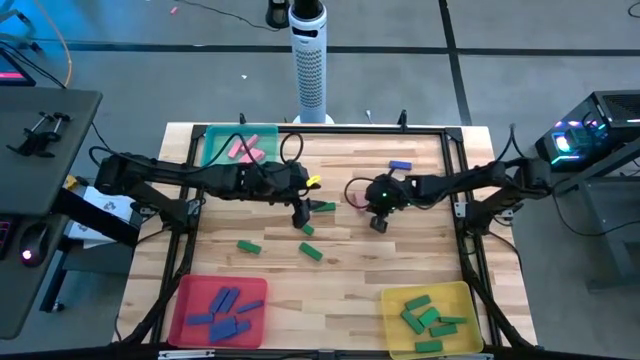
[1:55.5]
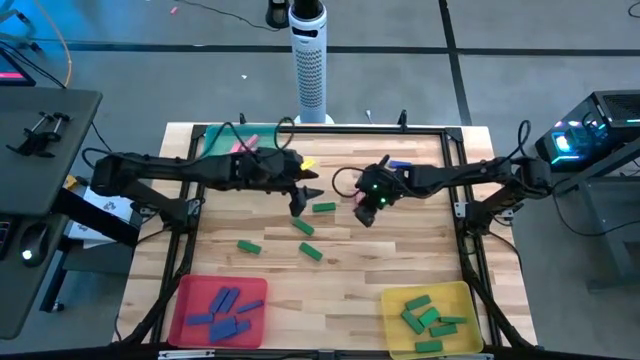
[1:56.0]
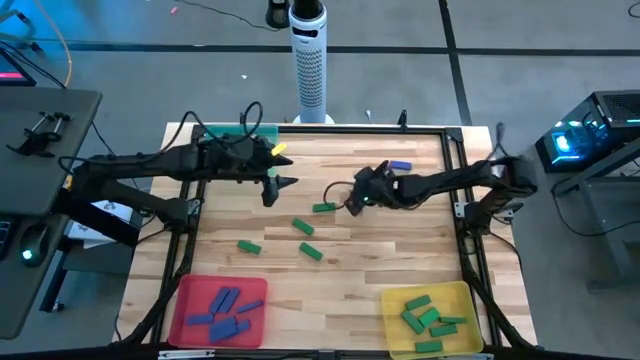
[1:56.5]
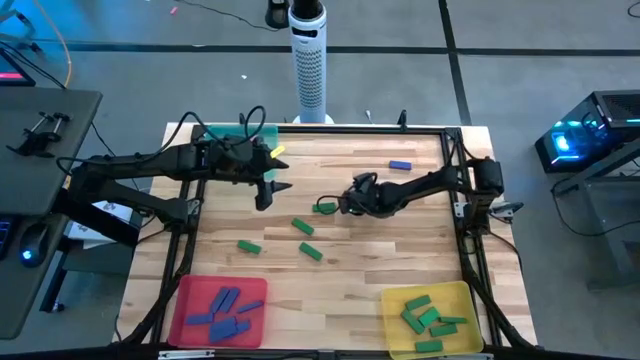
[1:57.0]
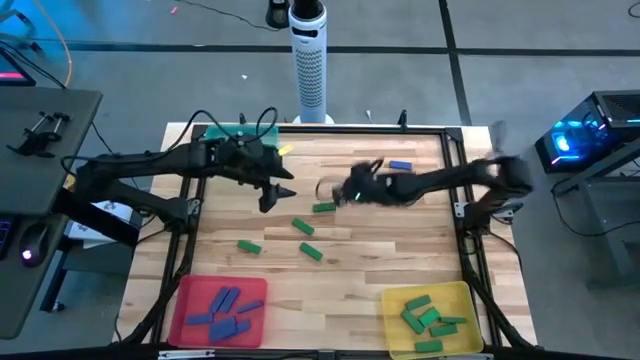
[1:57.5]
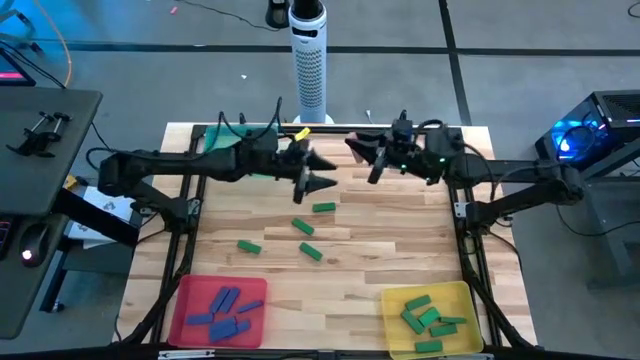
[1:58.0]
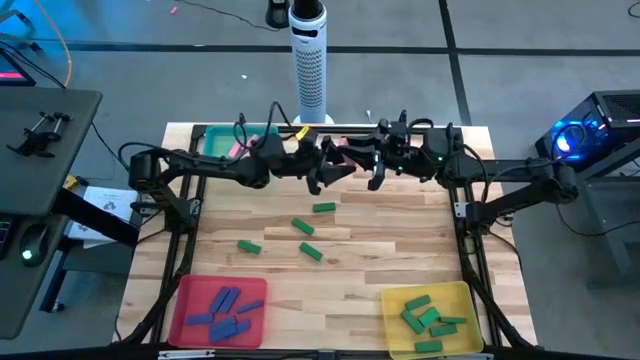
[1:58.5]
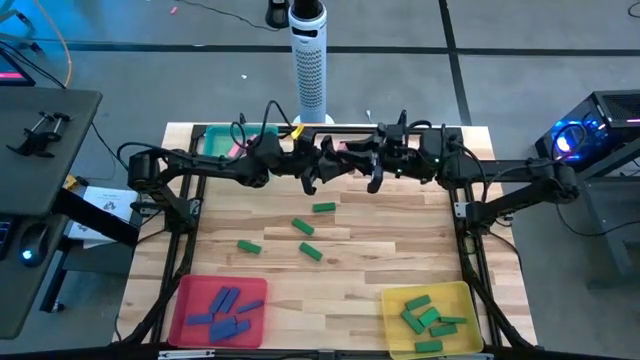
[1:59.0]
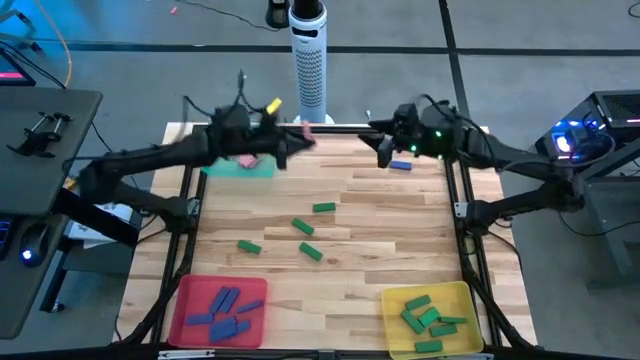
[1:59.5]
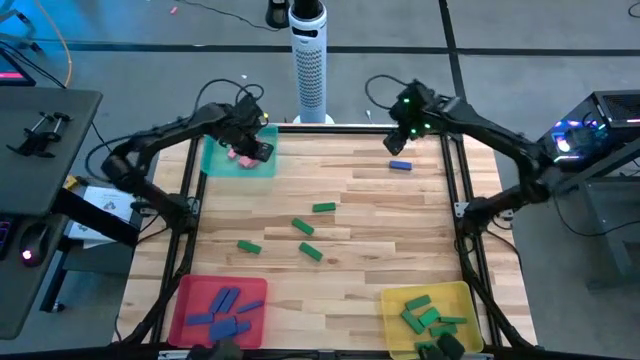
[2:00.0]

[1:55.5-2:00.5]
Task: Sort blocks
Put the pink block into the green bin

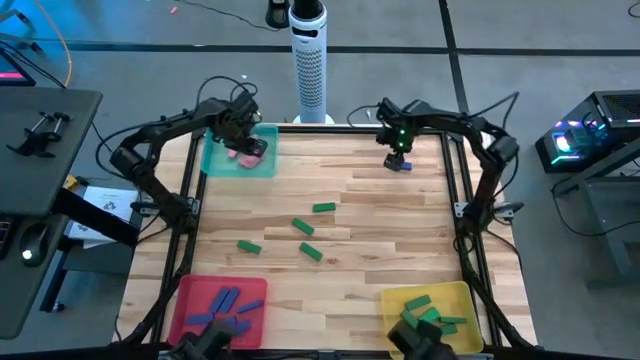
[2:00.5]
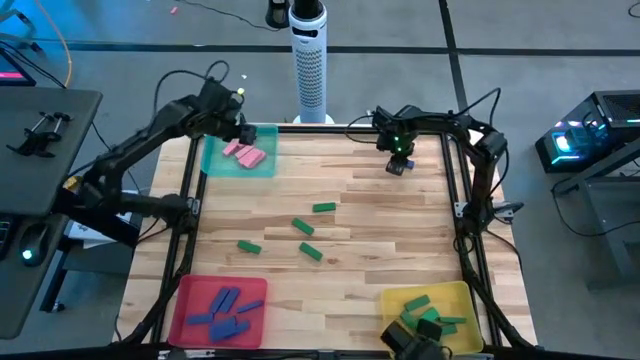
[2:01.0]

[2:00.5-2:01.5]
Put the blue block into the red bin

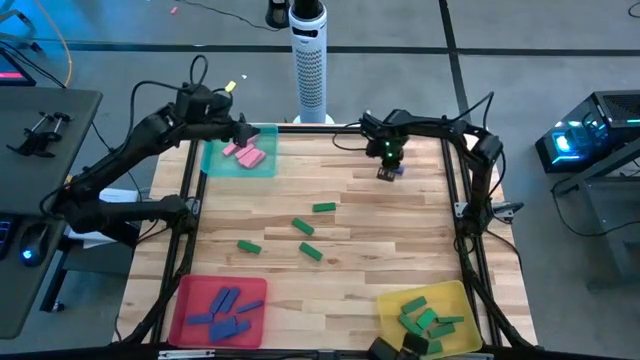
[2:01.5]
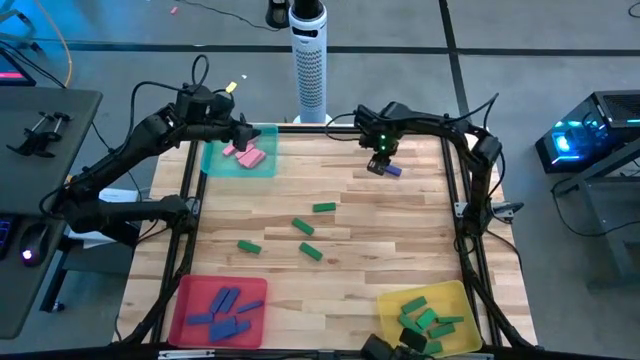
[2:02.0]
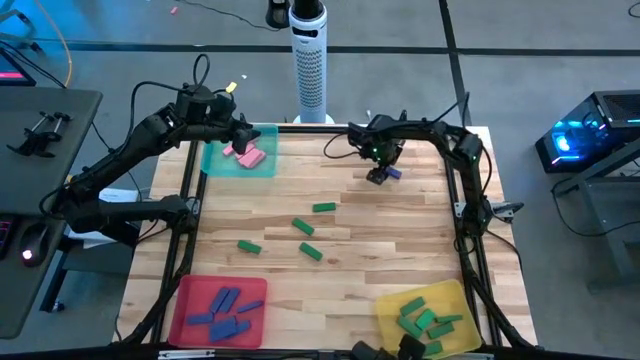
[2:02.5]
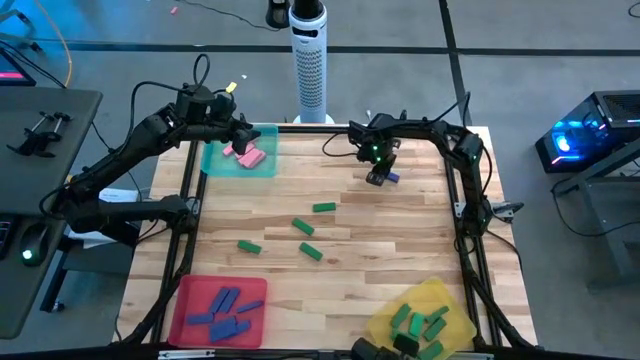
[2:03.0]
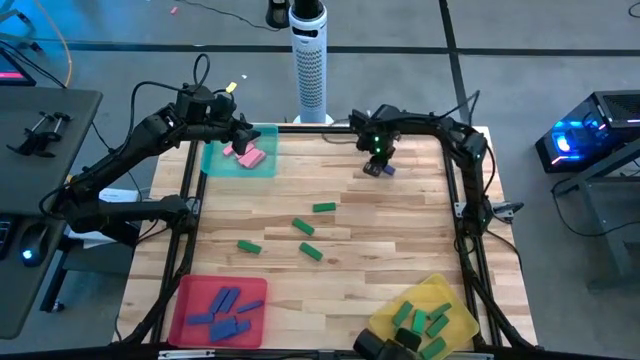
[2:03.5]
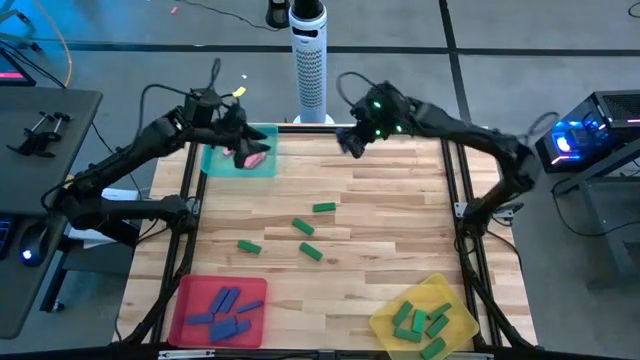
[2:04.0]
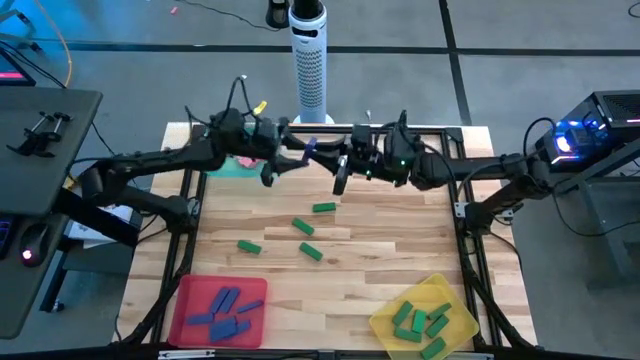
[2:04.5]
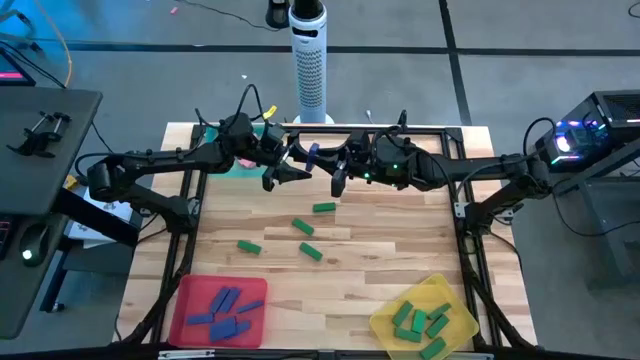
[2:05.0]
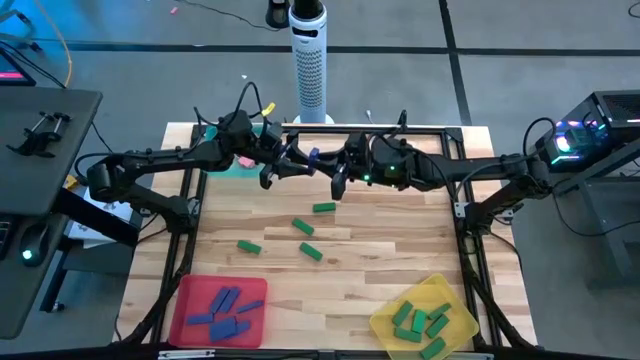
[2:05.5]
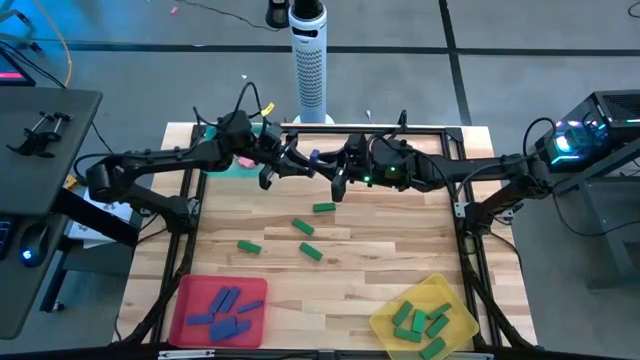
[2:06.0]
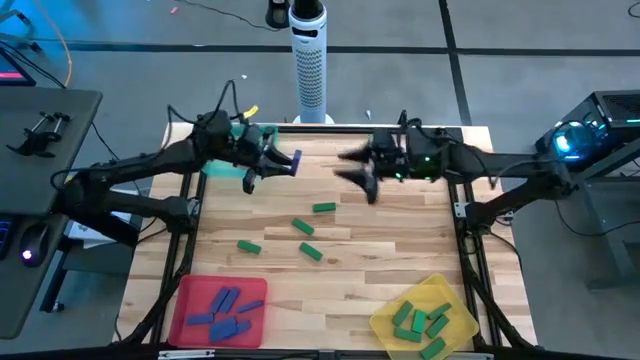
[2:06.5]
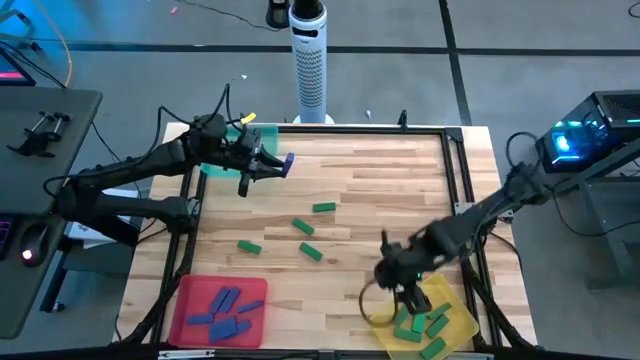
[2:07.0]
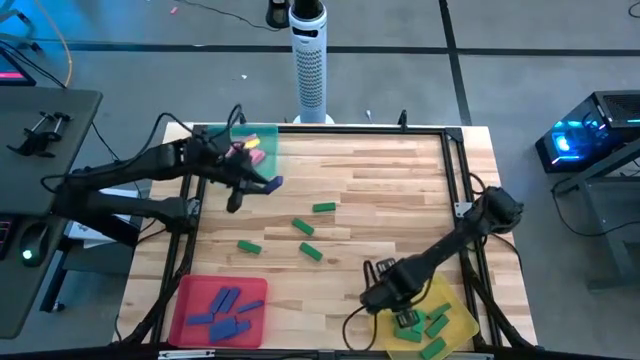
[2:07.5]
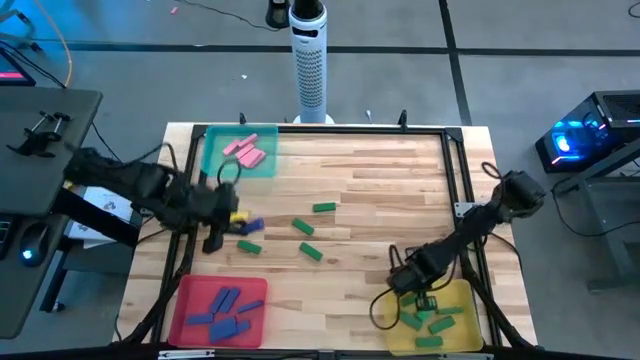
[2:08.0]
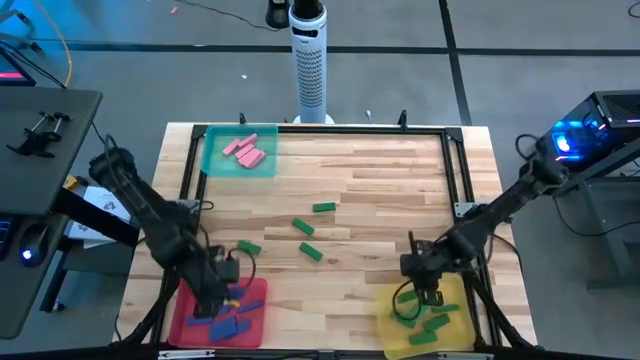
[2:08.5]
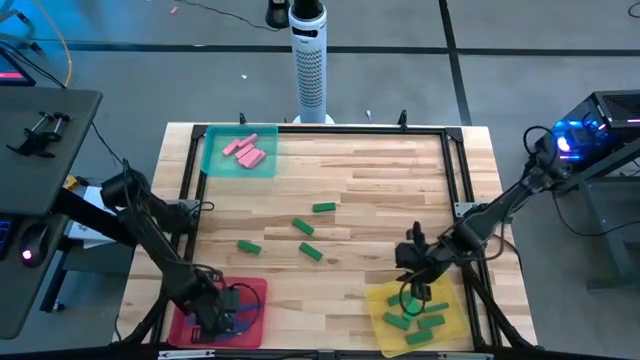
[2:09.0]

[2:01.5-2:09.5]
Put the blue block into the red bin

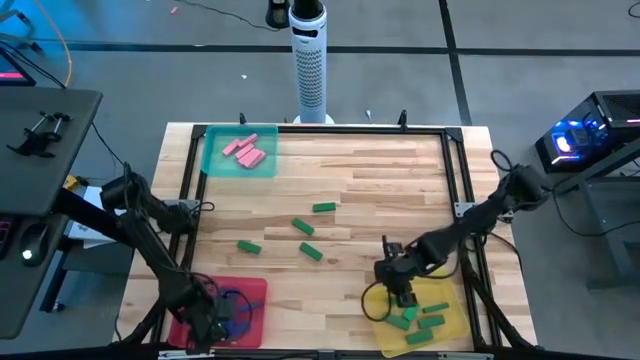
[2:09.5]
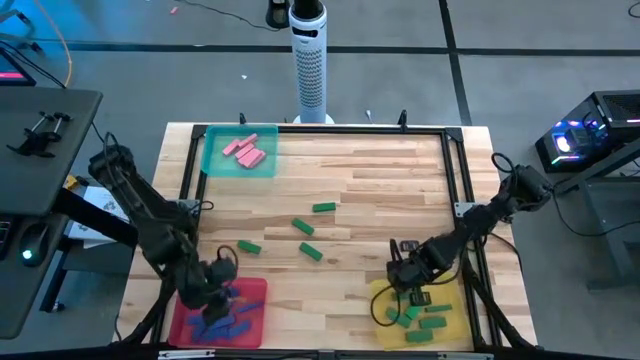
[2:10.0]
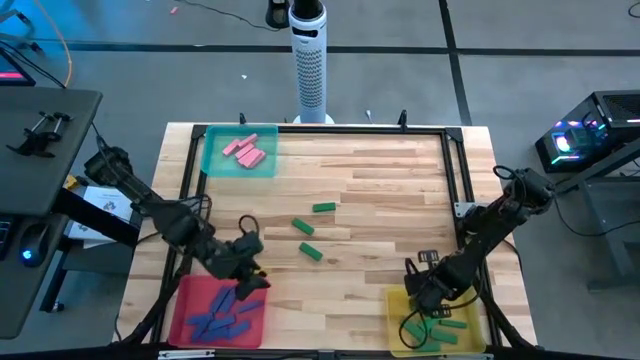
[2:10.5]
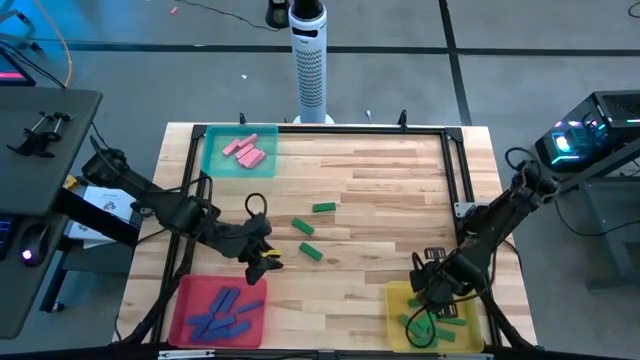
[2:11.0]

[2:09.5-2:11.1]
Adjust the yellow bin on the table

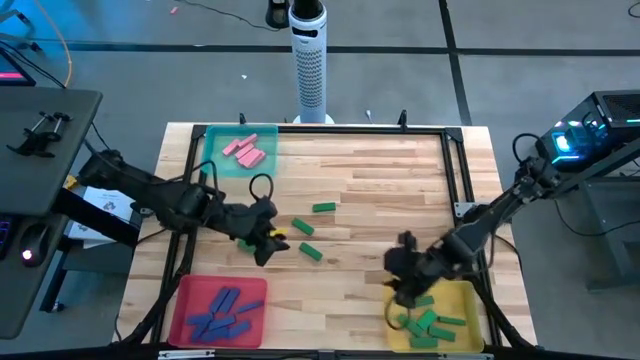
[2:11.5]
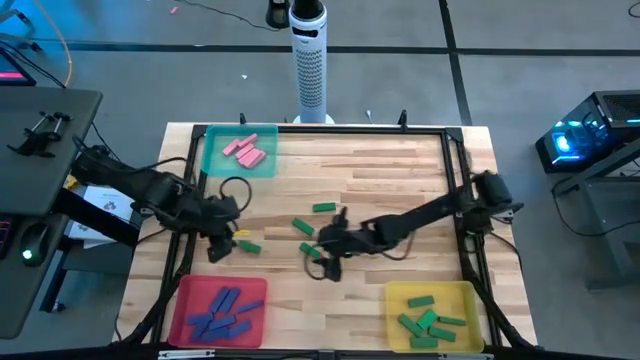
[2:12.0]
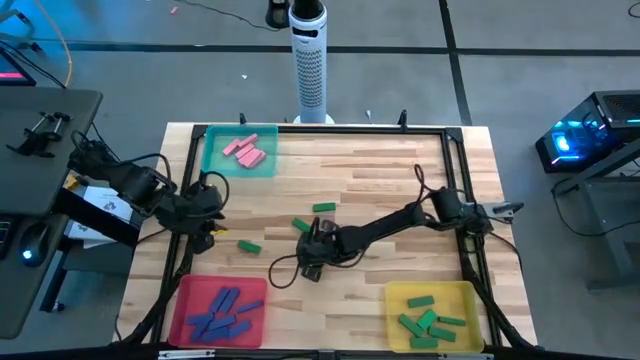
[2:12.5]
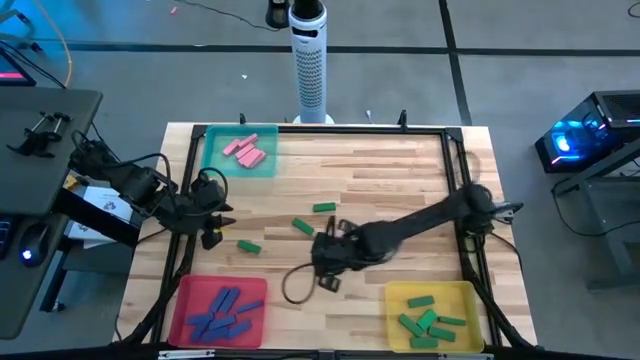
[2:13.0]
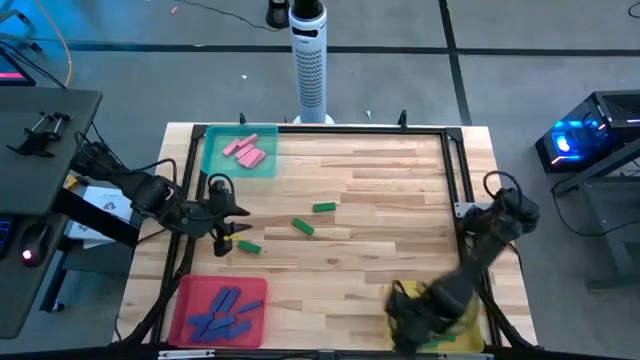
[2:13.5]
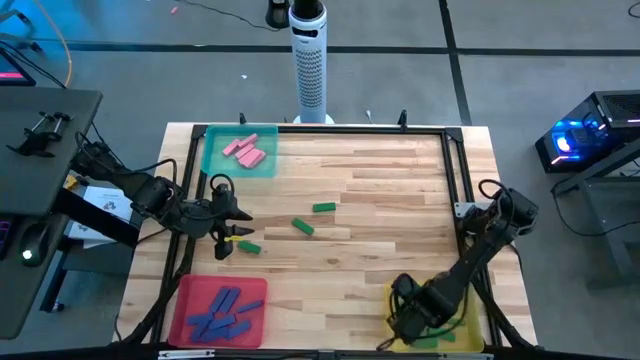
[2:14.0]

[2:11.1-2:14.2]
Put the green block into the yellow bin

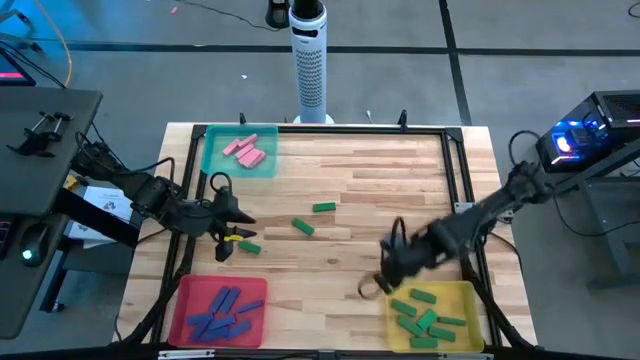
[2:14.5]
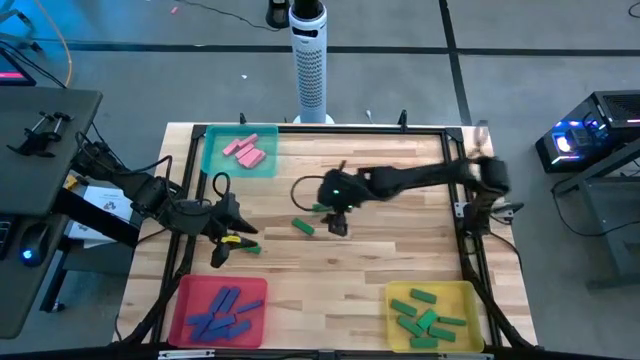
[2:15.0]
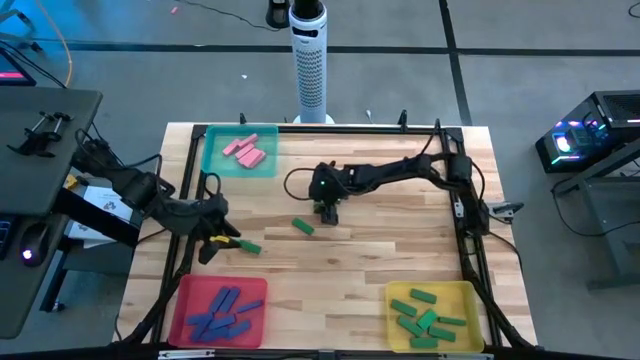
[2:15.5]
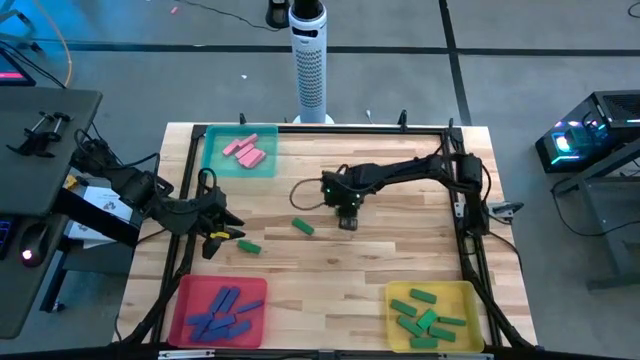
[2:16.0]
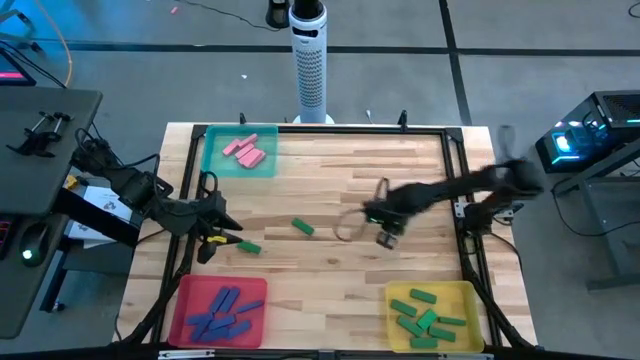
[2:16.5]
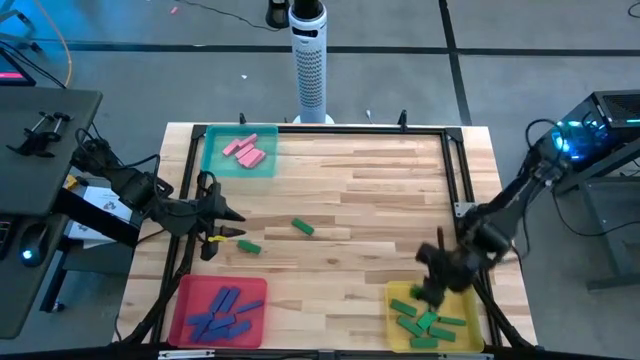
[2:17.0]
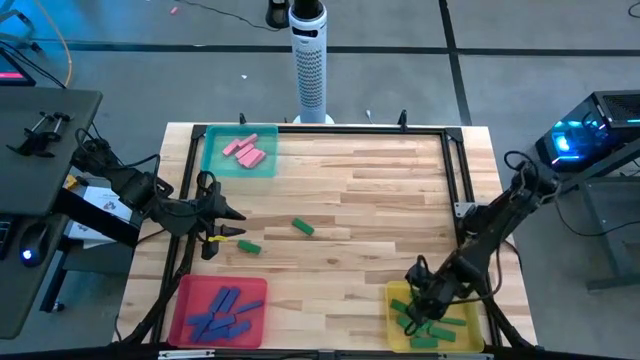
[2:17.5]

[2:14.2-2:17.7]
Put the green block into the yellow bin
